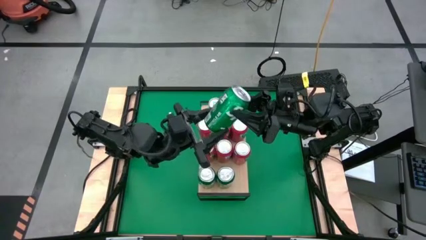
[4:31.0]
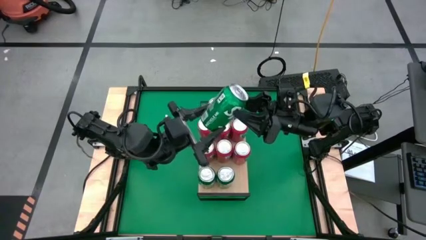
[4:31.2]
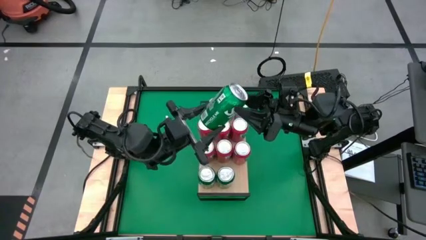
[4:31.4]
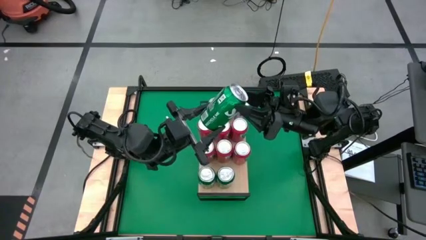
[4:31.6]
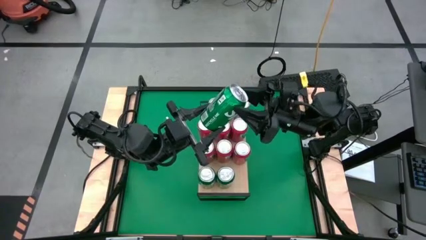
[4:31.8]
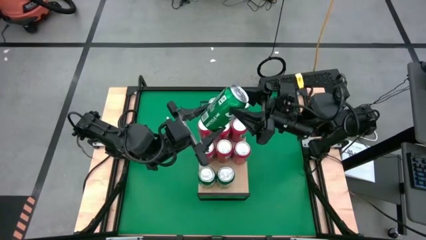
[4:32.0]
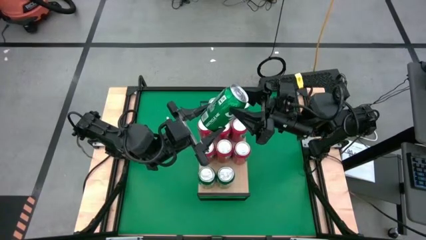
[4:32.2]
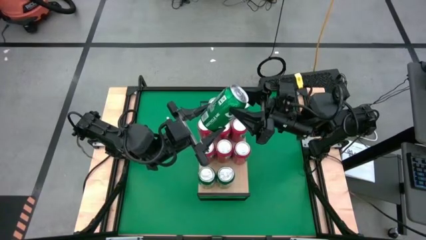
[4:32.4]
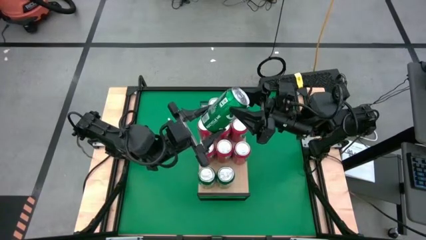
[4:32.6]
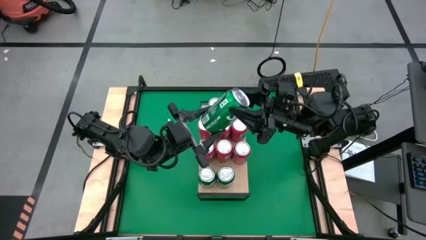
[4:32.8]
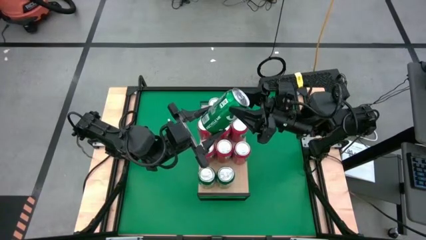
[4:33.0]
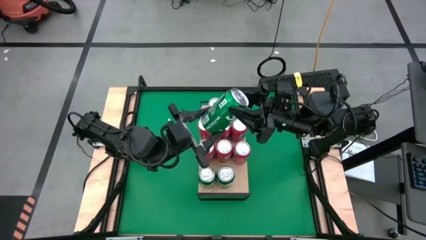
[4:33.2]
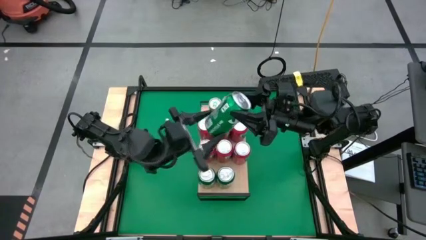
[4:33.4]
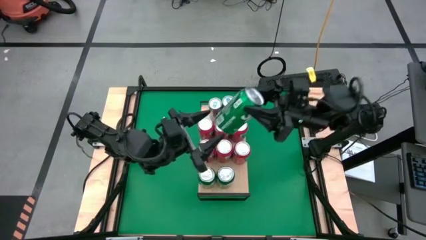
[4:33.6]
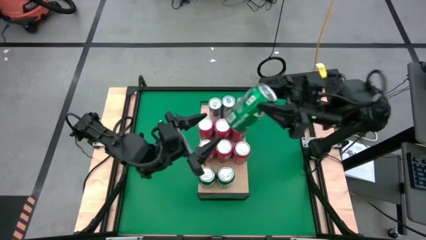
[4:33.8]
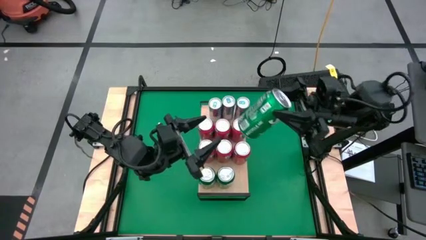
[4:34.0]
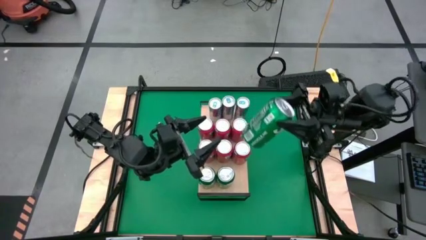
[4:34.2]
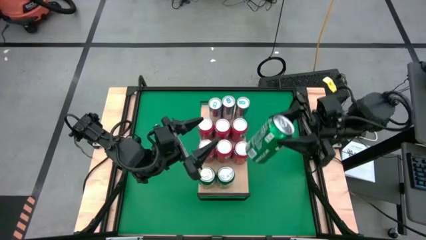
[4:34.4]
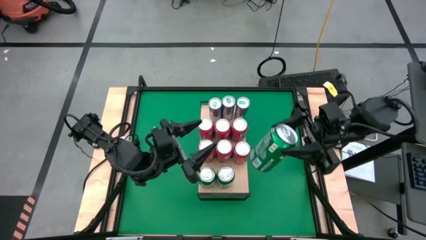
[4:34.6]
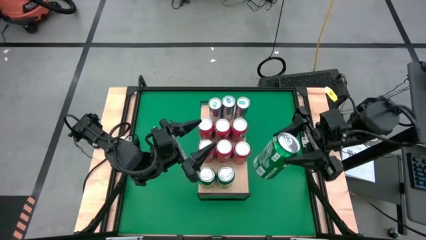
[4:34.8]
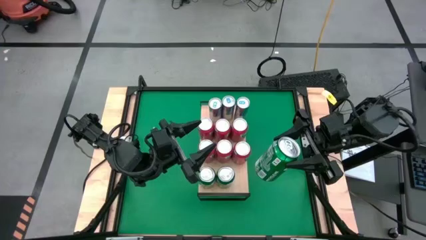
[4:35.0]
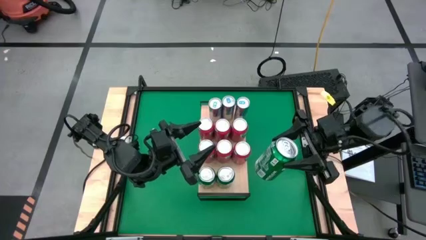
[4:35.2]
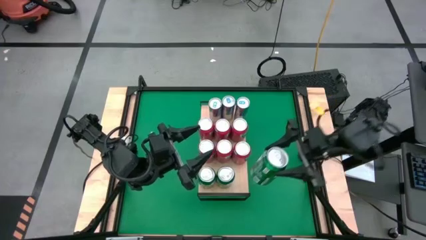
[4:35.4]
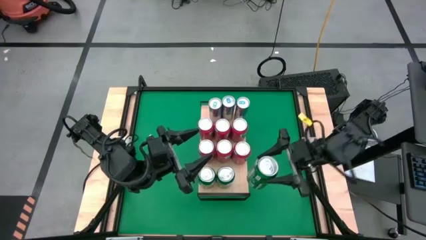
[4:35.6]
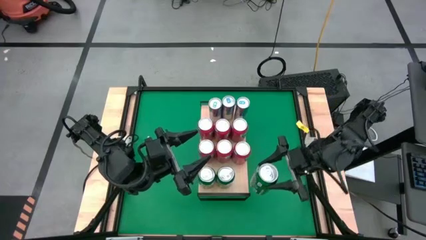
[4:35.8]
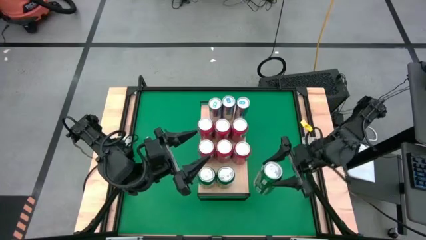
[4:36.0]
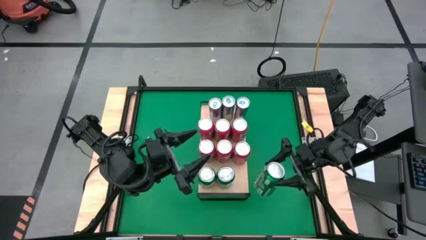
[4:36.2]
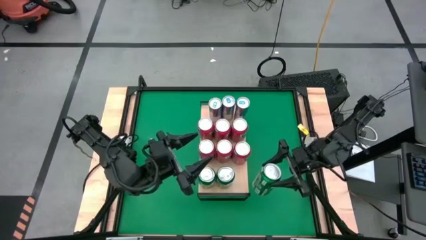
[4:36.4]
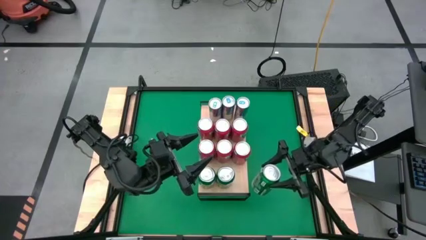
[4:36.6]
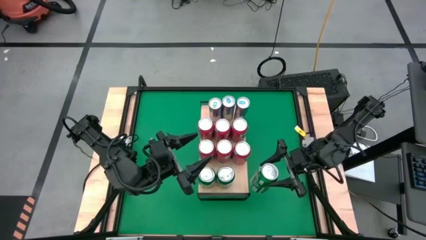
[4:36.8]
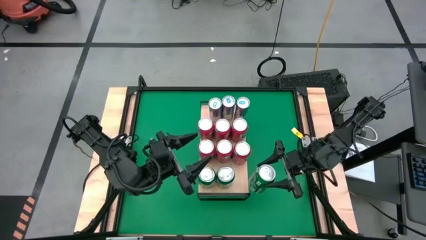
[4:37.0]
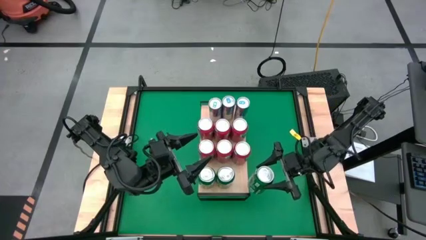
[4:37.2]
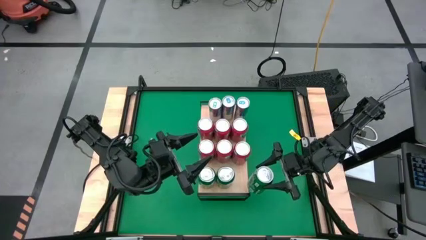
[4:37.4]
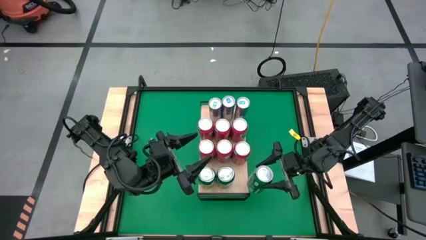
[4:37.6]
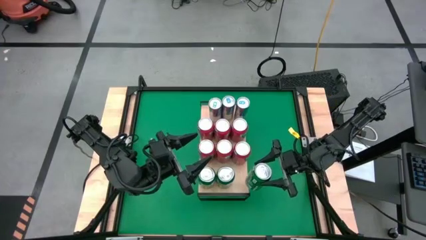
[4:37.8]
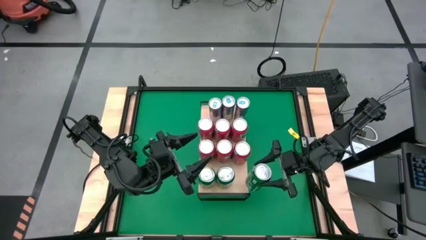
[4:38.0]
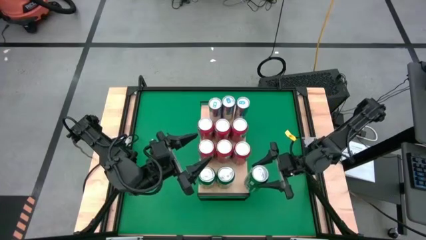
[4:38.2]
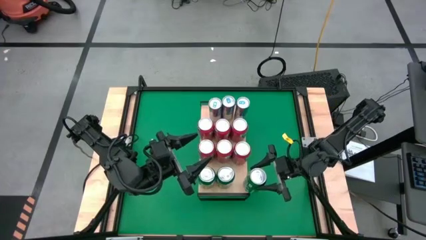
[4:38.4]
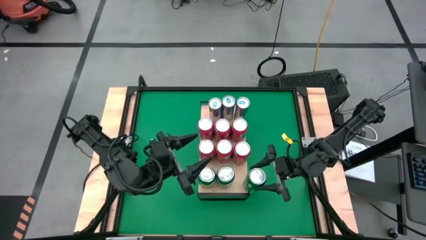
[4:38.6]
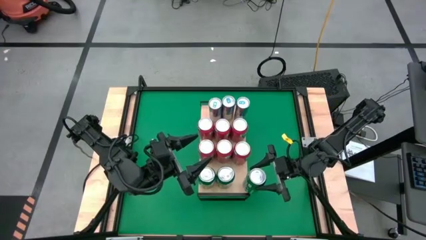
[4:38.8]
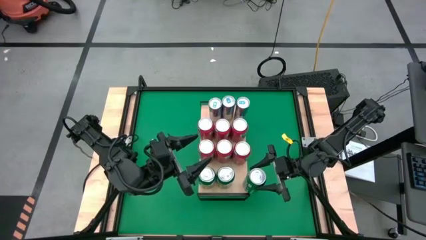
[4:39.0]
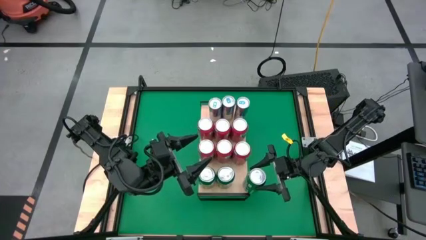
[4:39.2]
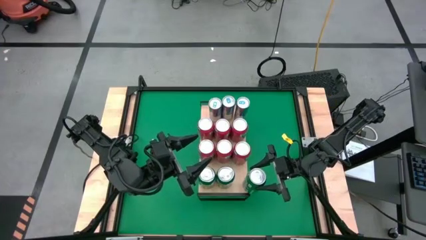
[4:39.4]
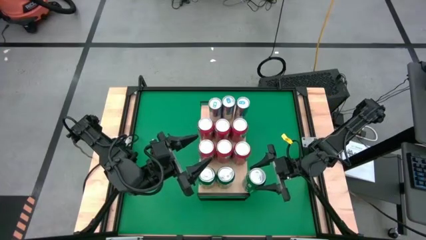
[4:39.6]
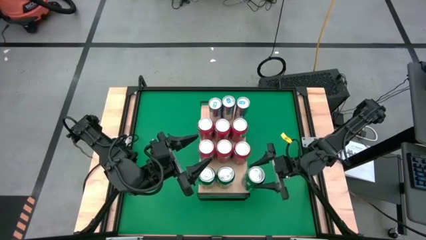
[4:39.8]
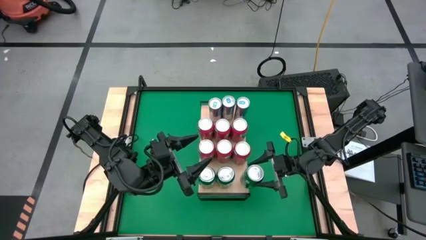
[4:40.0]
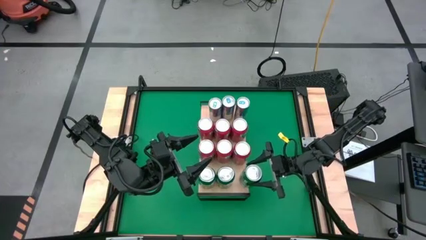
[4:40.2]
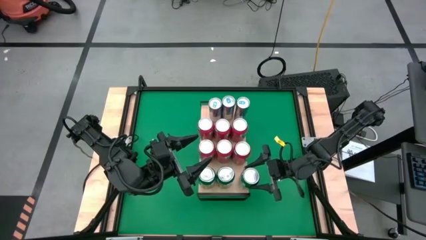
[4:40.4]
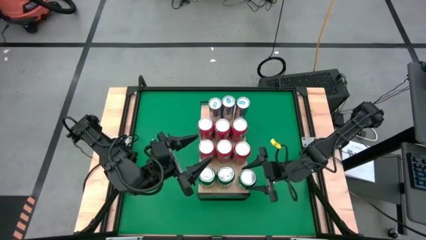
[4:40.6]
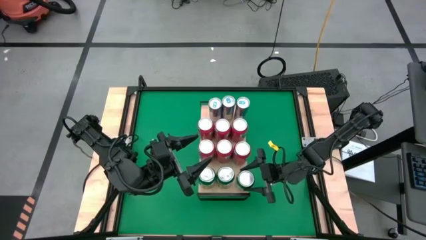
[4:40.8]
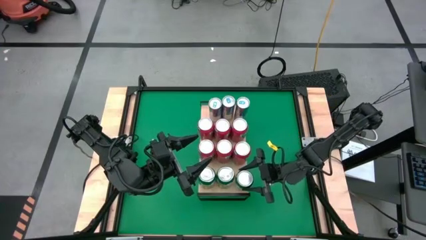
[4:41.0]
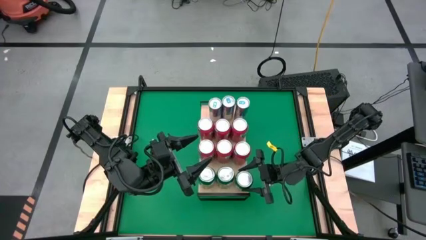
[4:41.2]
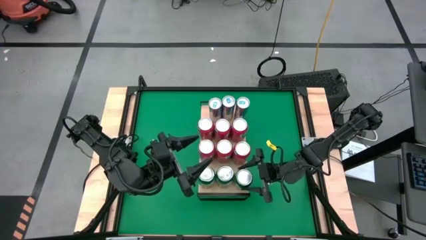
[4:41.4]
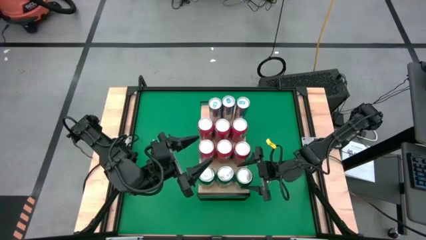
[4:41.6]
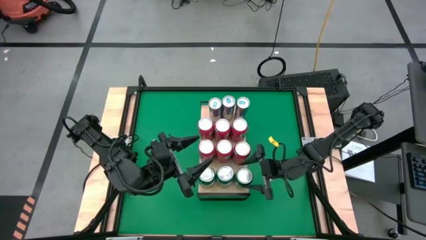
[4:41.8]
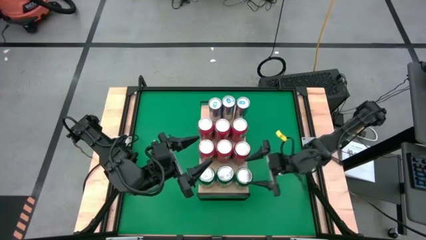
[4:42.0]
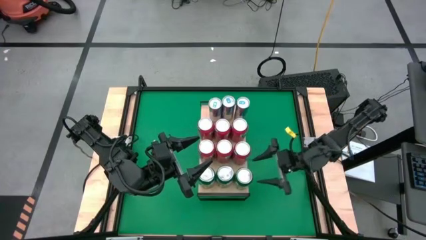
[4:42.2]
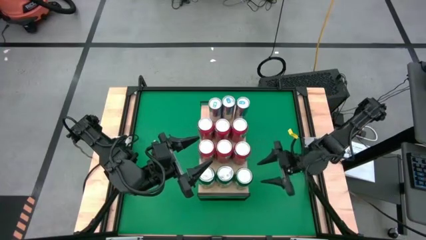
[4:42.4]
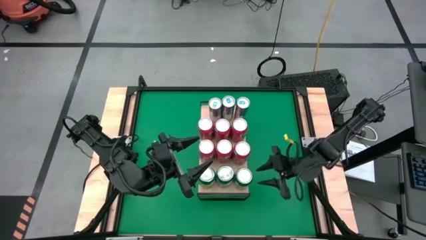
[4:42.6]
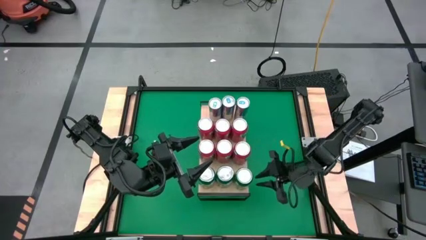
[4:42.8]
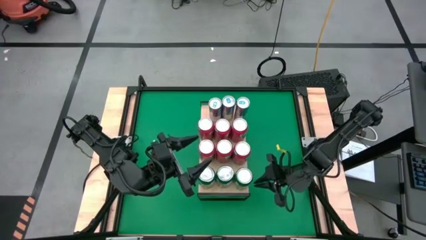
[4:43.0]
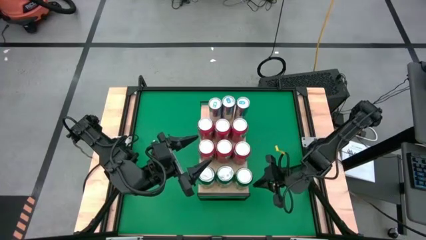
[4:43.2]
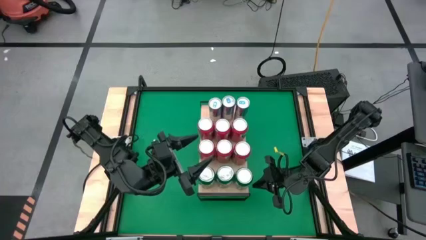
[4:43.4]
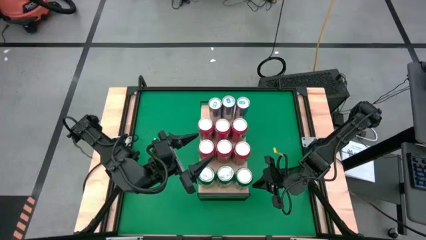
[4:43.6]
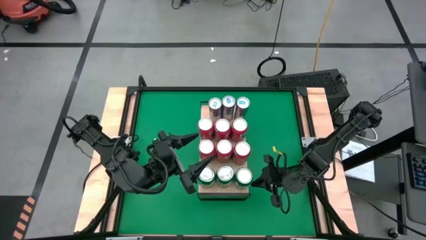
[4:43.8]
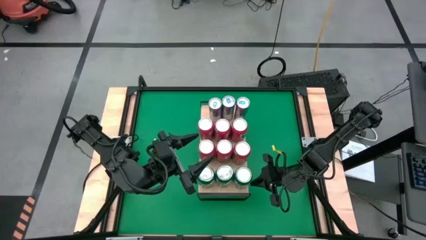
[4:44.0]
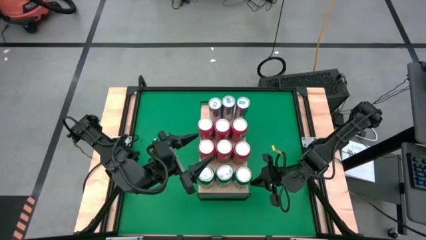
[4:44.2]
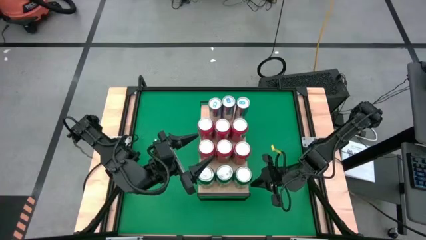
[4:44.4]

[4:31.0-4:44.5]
Task: Place canned beverage on shelf
Put the green soda can on the shelf aligned with the other green soda cans

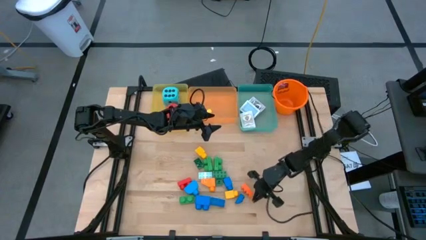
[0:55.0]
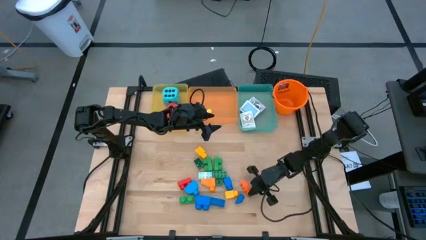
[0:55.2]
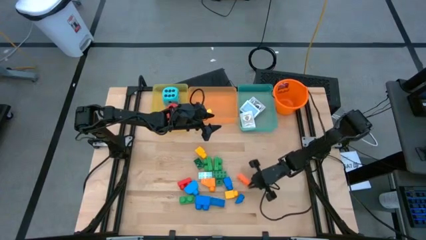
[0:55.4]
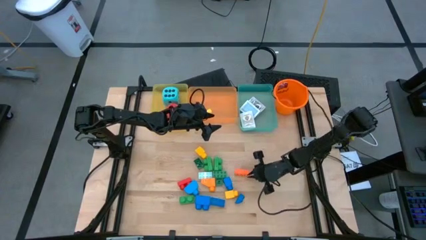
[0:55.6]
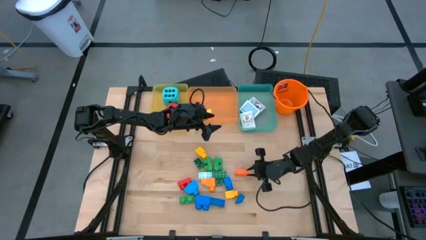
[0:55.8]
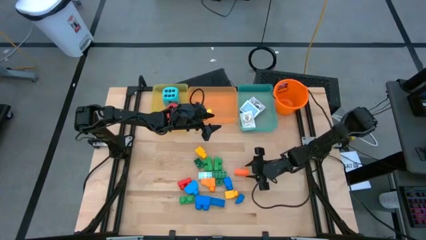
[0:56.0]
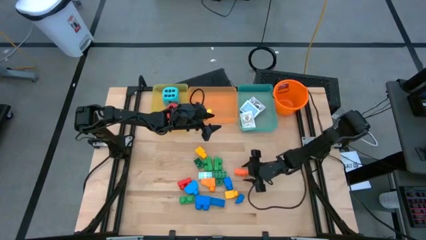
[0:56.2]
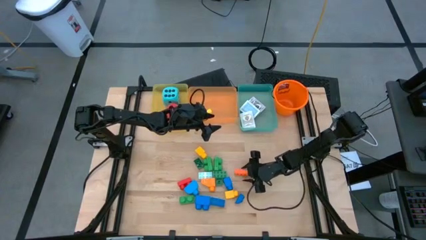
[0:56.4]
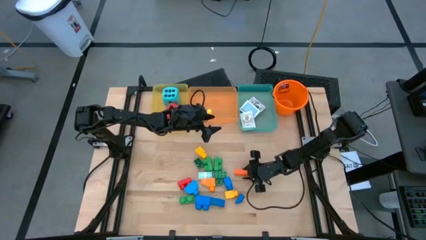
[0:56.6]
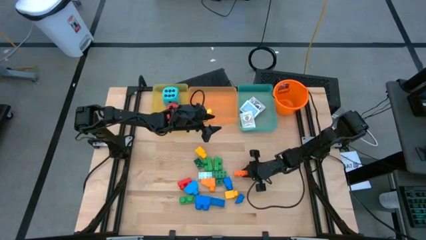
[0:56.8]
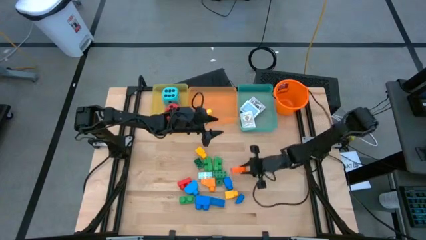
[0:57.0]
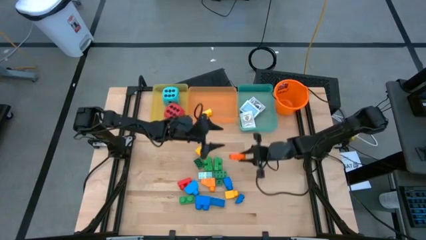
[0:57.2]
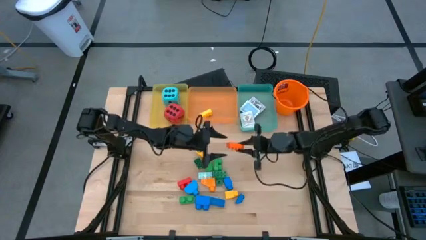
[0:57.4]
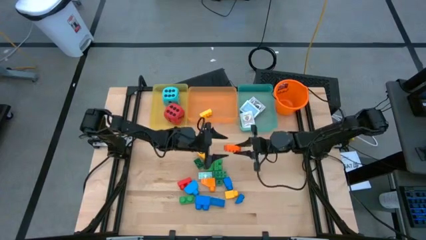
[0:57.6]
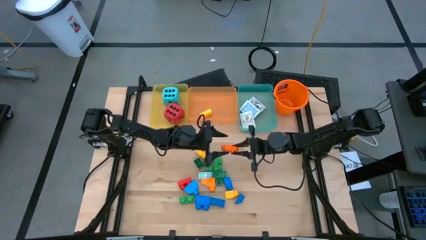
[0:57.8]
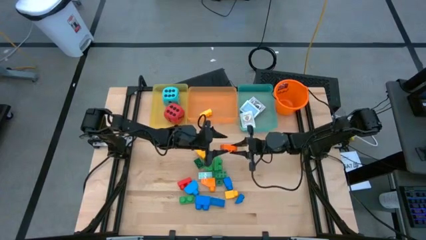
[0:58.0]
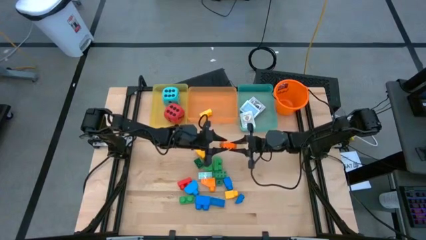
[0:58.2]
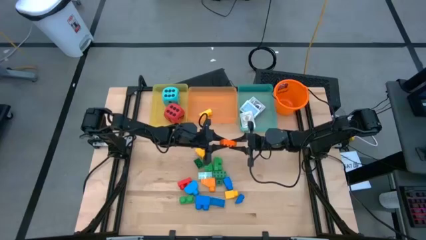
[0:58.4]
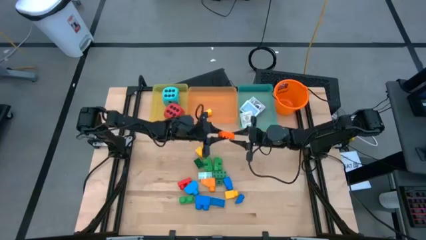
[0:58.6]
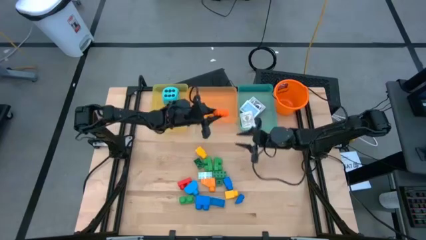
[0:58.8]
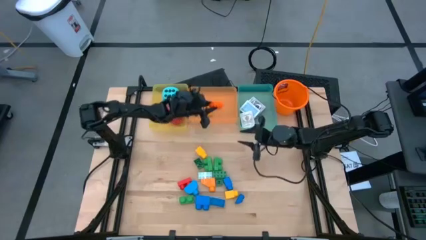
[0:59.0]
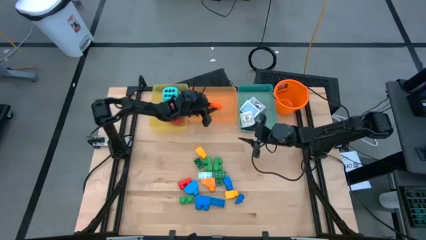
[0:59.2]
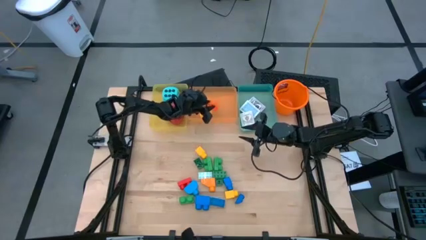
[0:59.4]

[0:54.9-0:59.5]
Task: Pick & Place Toys
Put the orange game piece into the orange bin
